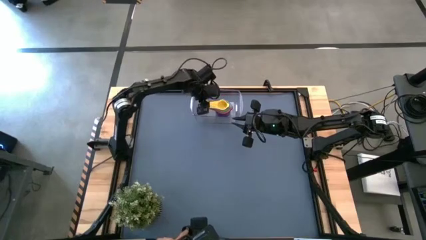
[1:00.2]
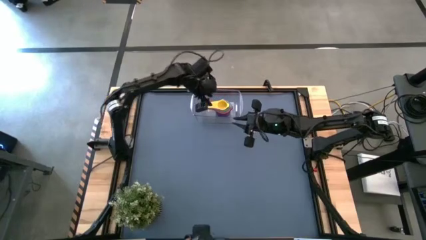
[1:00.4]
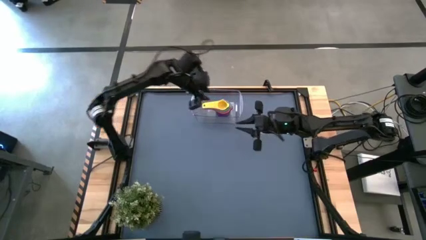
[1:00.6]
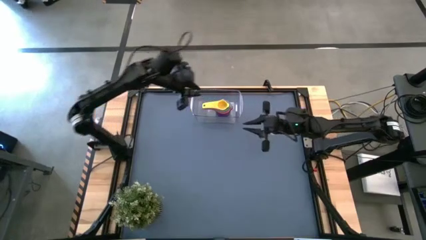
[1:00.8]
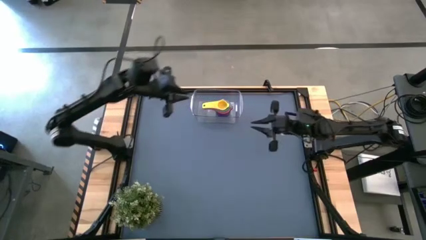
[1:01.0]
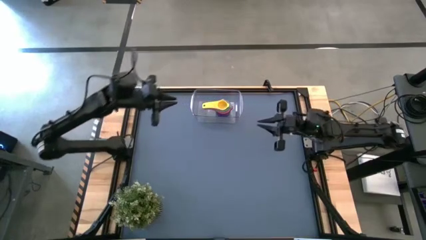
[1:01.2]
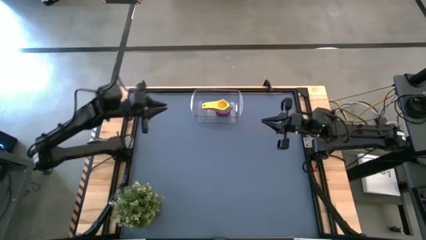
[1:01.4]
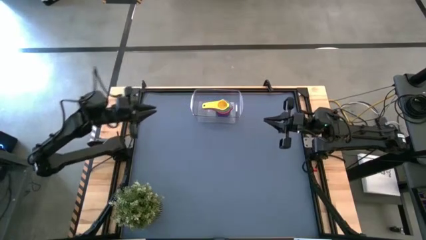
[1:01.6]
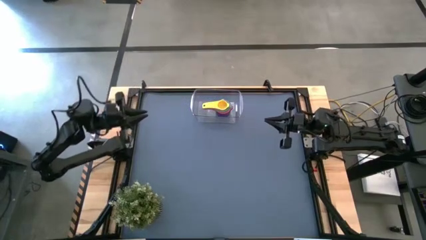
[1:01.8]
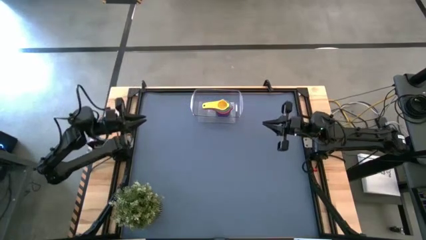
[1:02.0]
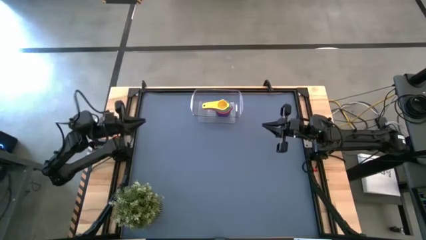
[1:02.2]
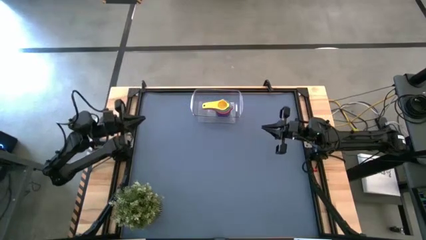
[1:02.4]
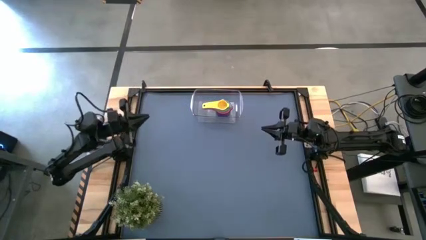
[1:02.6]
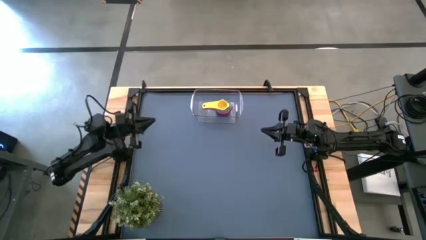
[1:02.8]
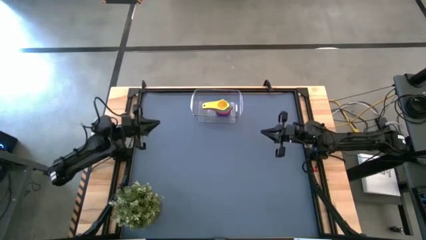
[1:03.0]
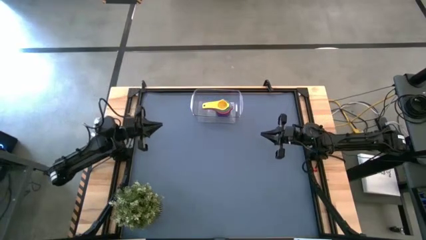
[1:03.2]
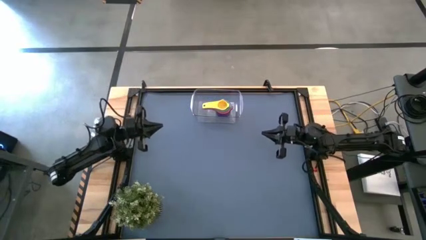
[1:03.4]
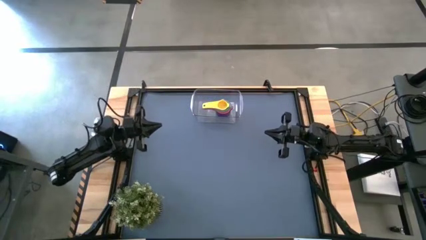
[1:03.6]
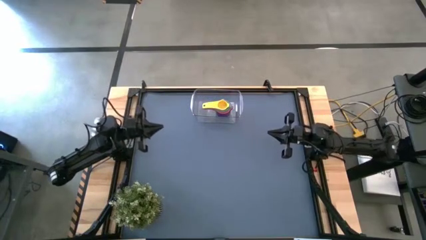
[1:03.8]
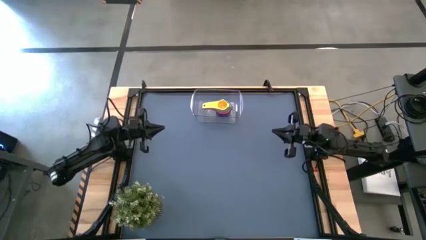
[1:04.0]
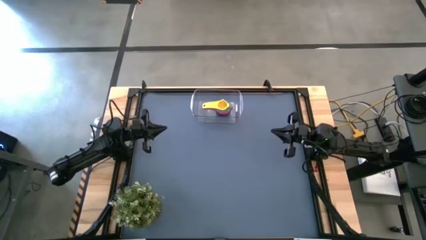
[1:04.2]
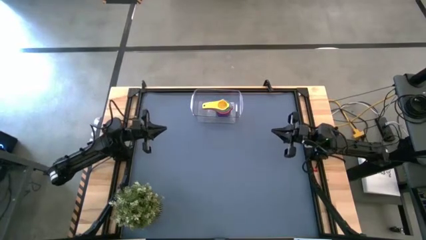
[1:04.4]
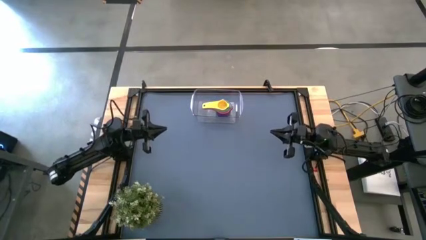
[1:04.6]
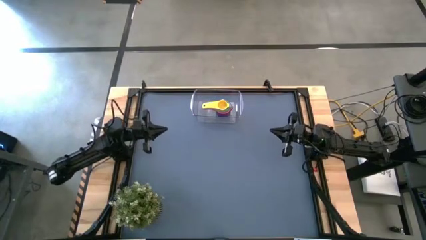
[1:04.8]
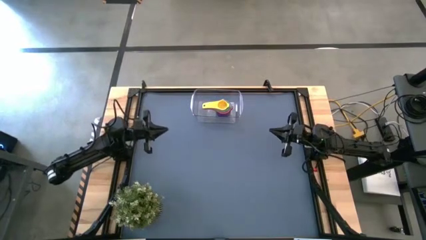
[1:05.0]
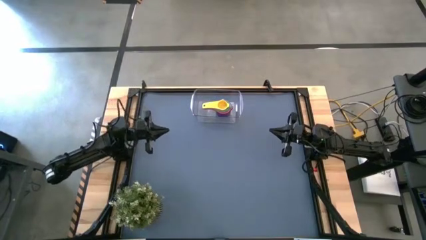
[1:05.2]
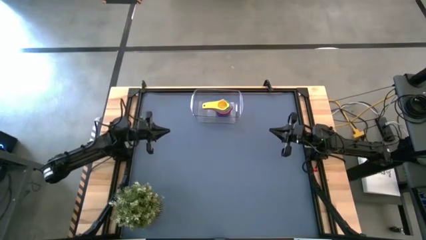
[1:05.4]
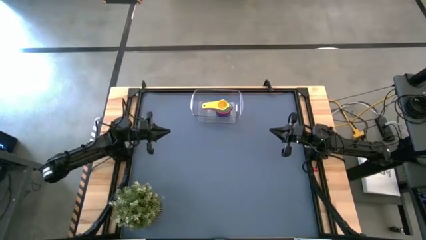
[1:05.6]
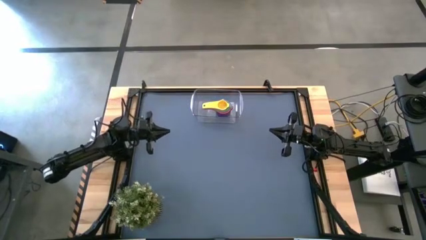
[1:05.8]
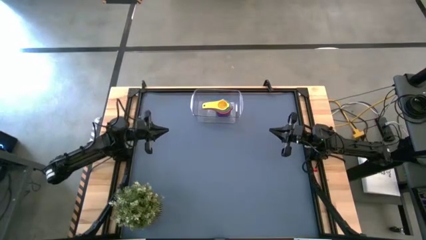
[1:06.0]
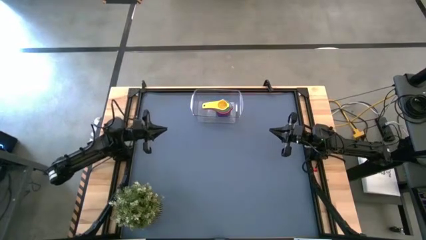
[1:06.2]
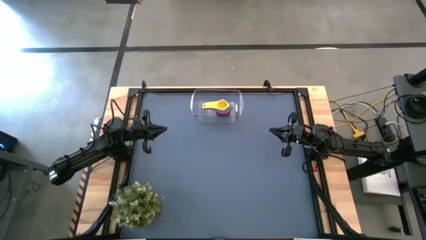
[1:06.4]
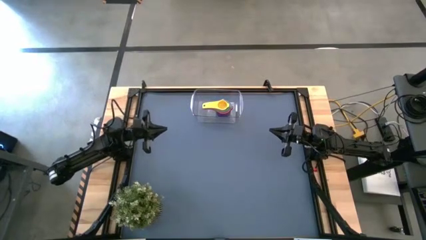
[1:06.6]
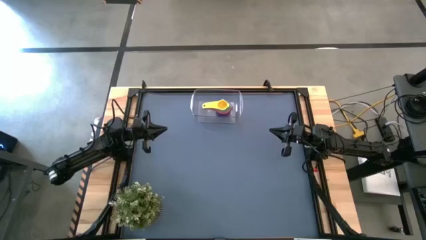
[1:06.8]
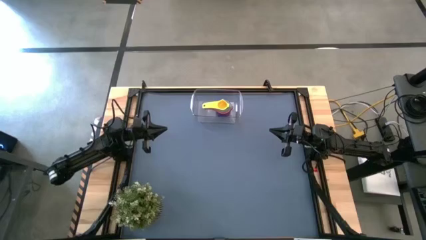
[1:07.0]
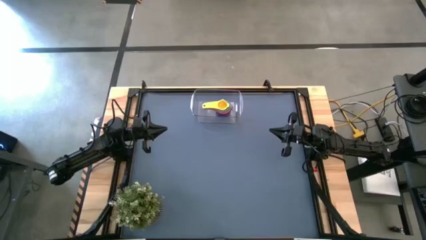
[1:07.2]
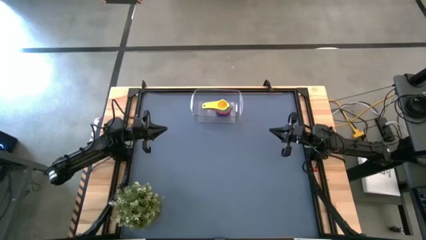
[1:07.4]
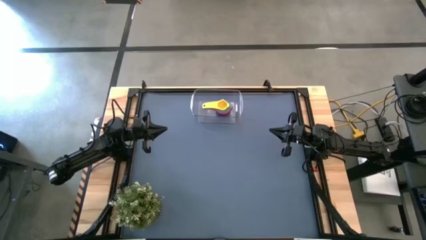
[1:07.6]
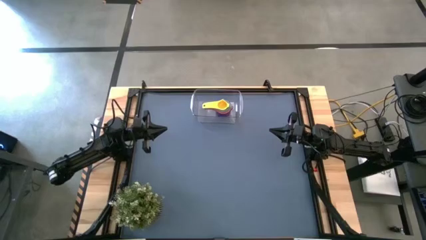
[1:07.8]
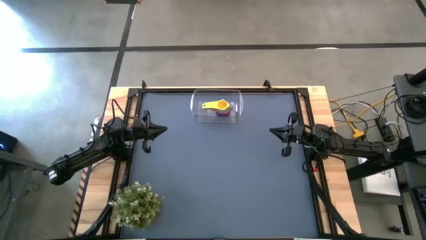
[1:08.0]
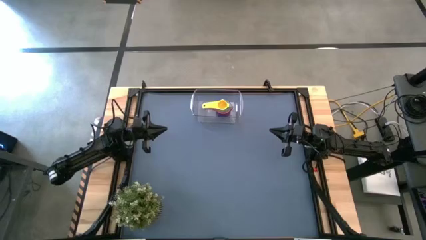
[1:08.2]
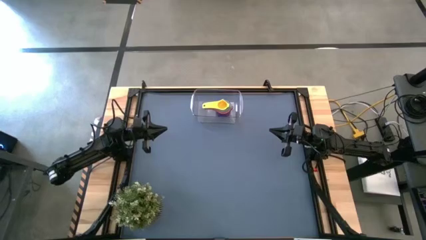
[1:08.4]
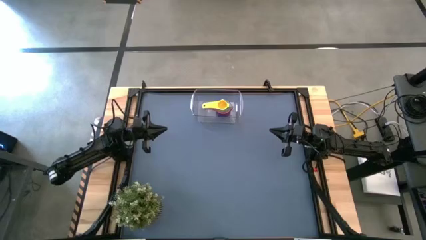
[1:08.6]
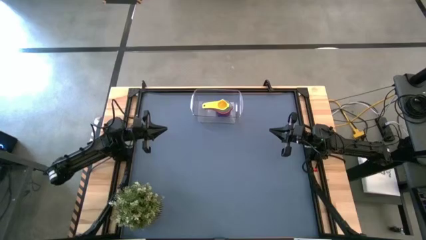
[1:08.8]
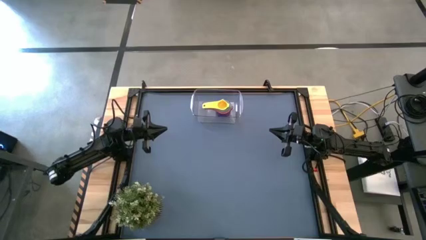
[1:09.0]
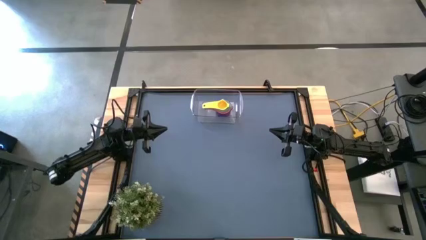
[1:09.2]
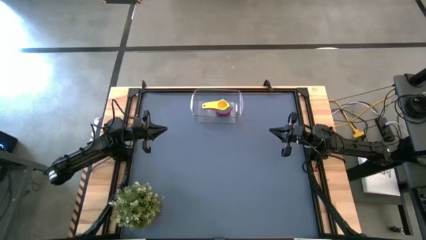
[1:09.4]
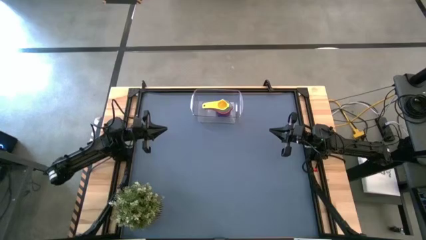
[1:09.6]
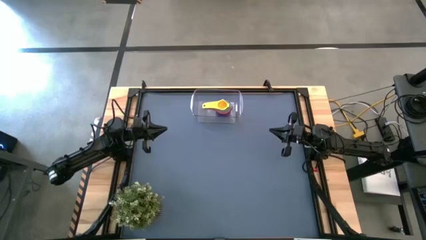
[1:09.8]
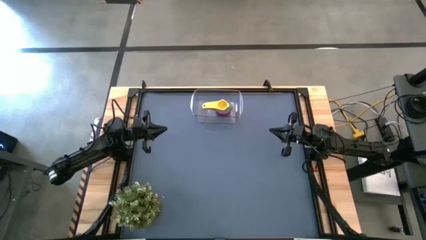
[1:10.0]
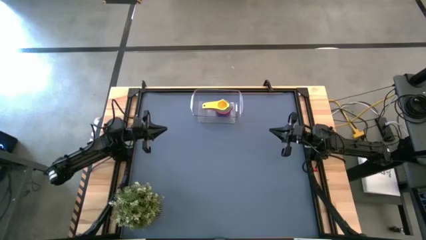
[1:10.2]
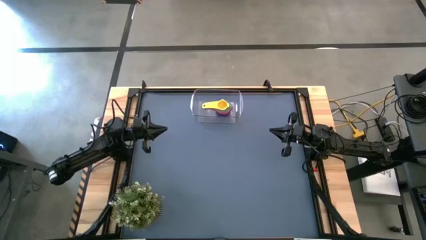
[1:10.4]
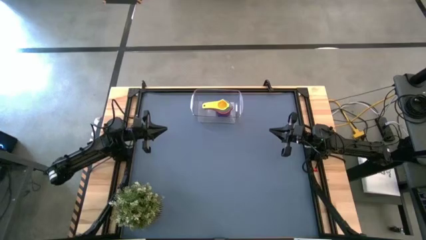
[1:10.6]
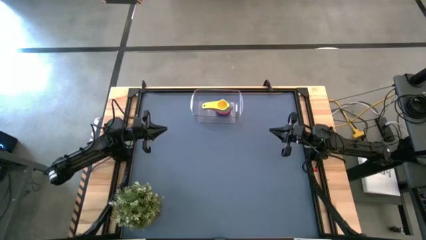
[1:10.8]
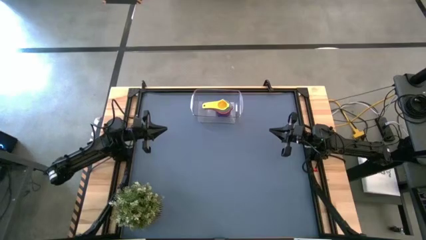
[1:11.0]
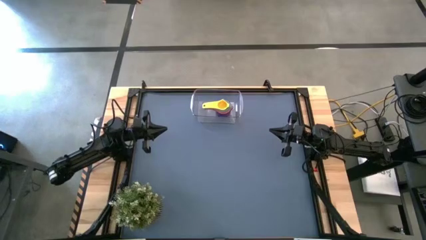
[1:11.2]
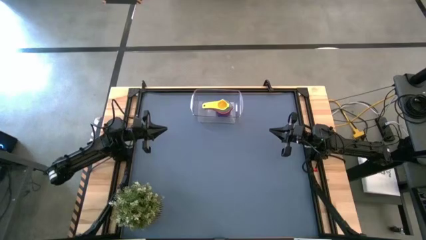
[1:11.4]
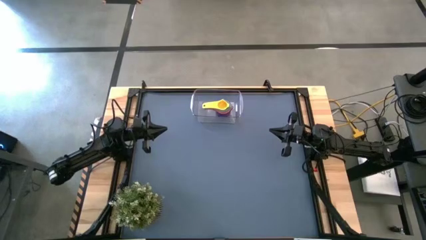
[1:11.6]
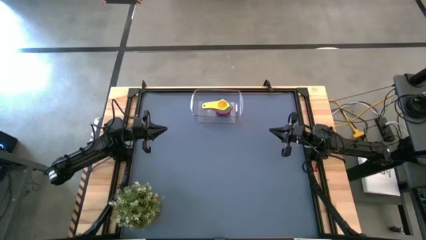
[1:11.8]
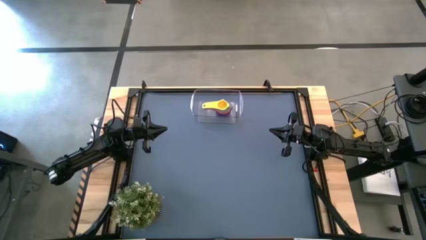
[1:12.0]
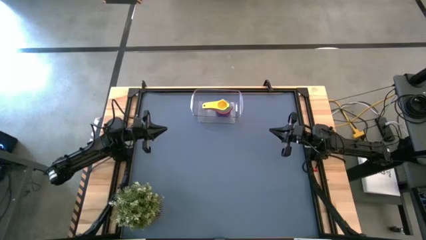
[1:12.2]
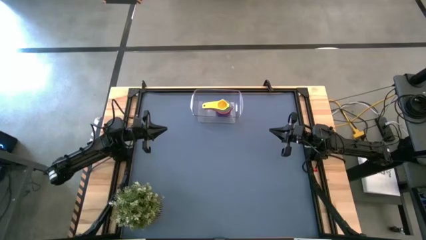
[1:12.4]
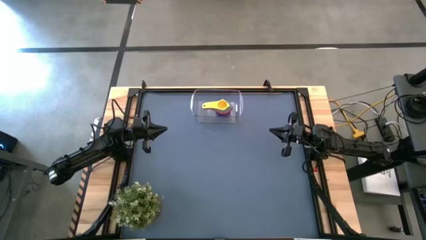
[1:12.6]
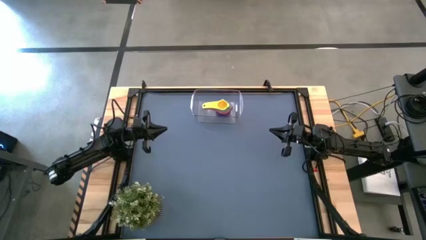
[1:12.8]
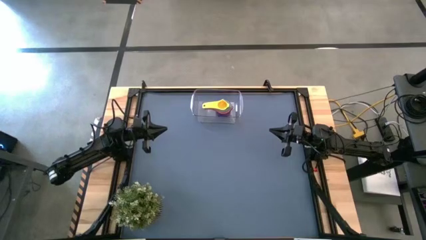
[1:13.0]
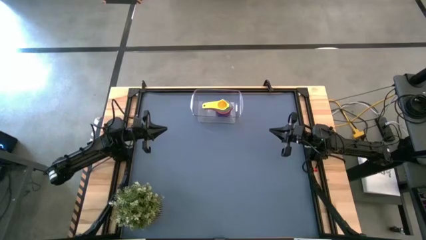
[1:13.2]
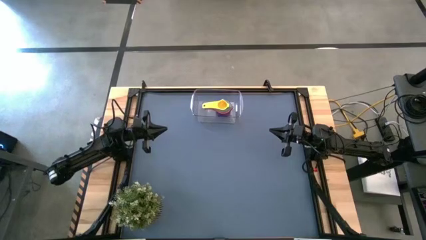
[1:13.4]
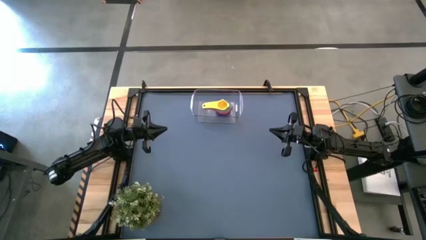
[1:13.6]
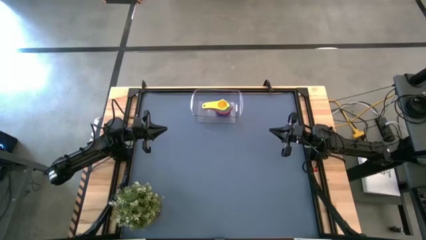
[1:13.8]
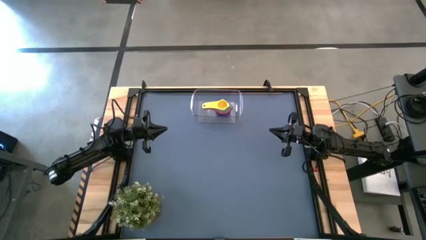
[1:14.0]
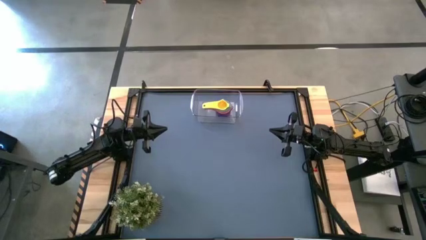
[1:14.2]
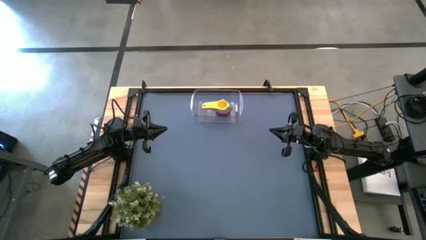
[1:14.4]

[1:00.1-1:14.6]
Task: Nest measuring cups in basket
Return to Home Position
